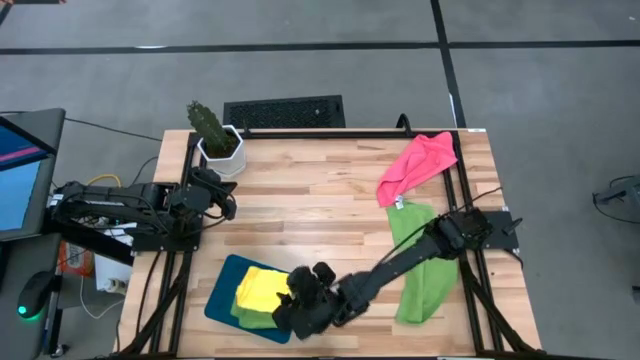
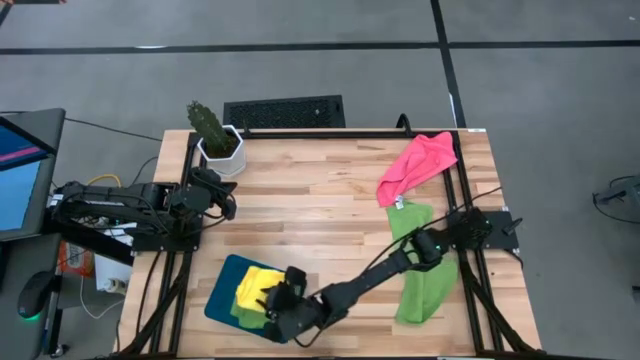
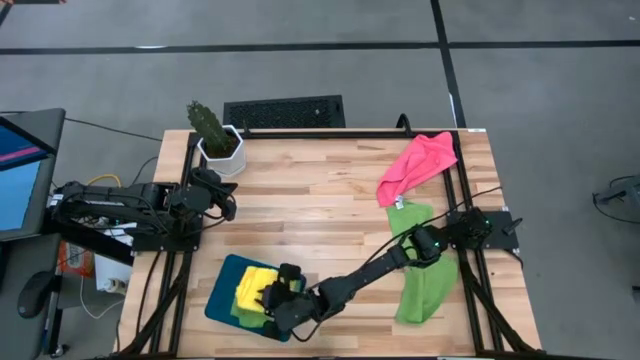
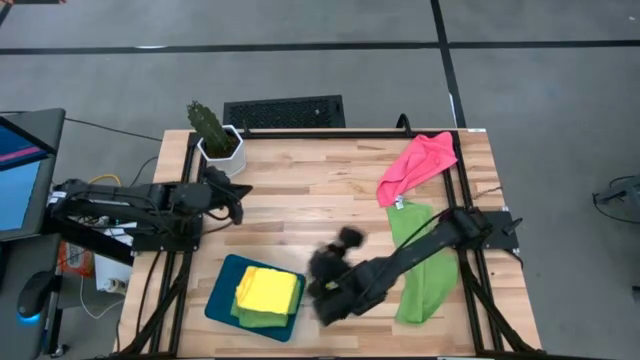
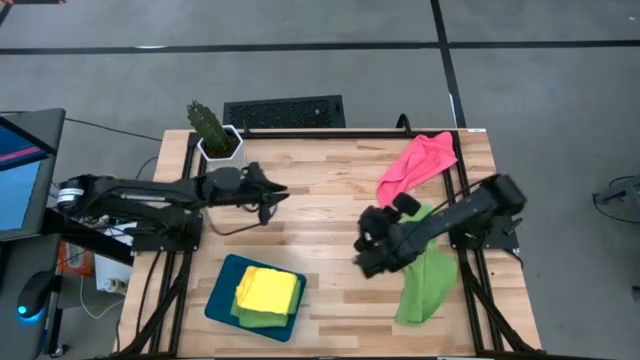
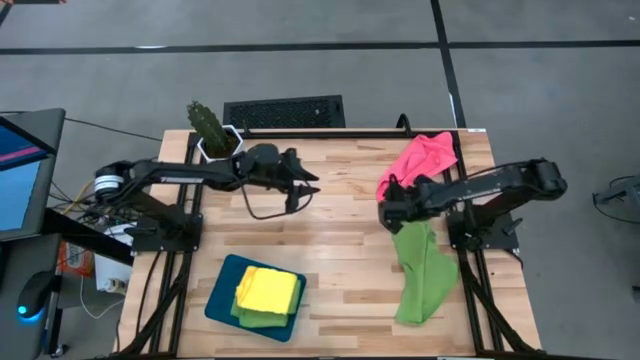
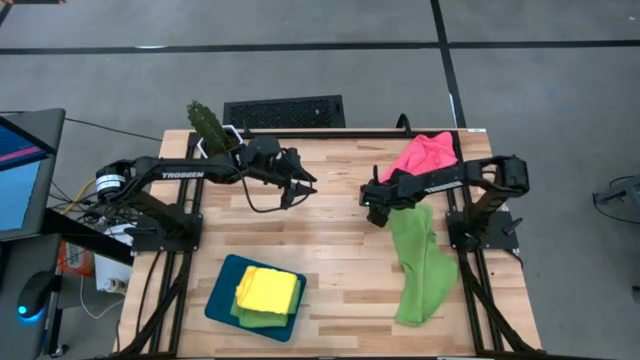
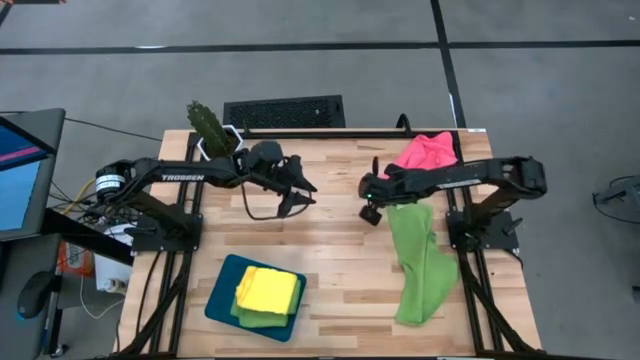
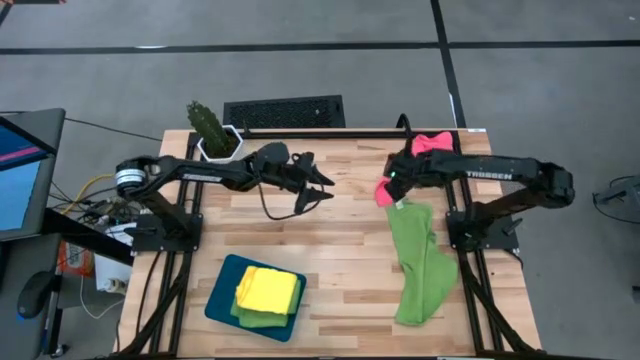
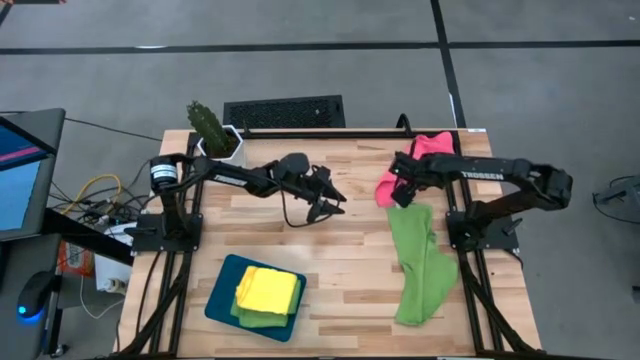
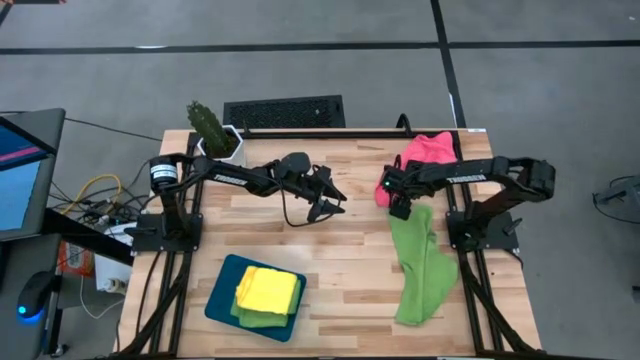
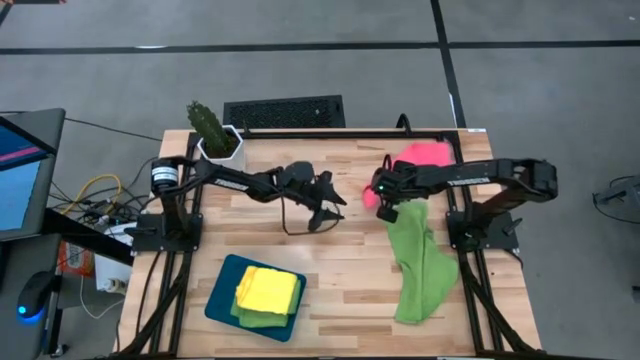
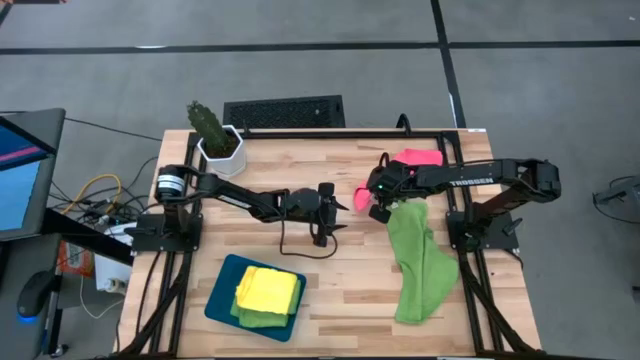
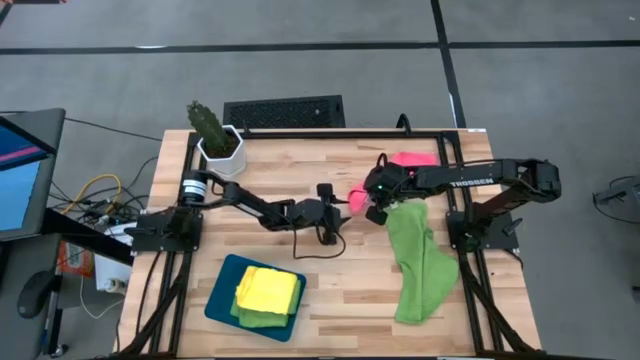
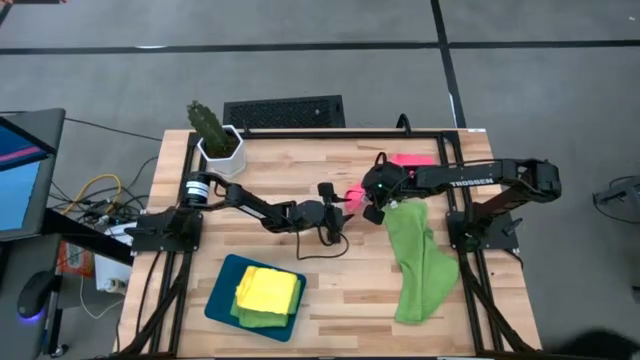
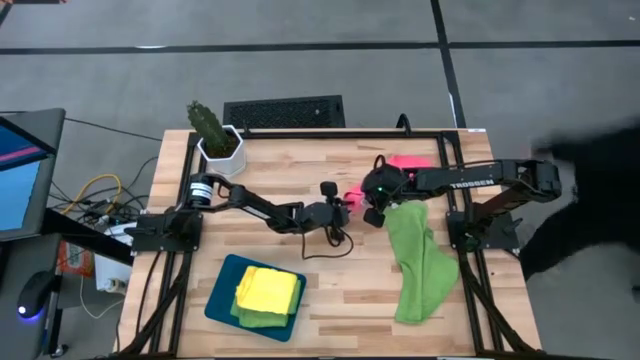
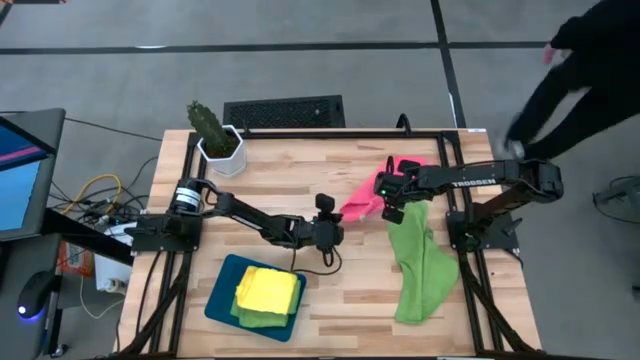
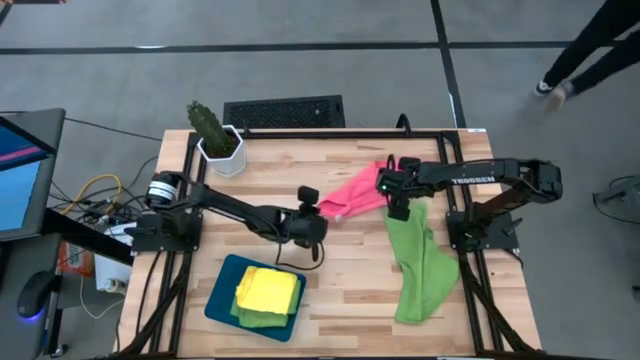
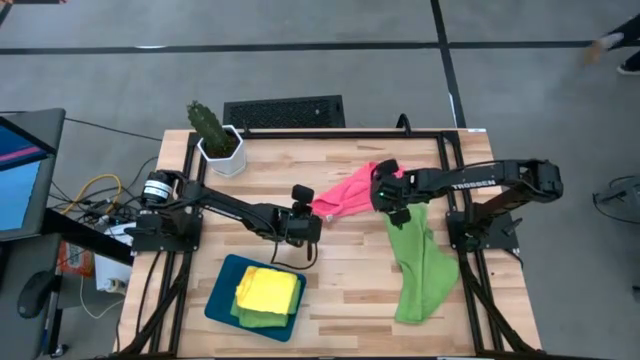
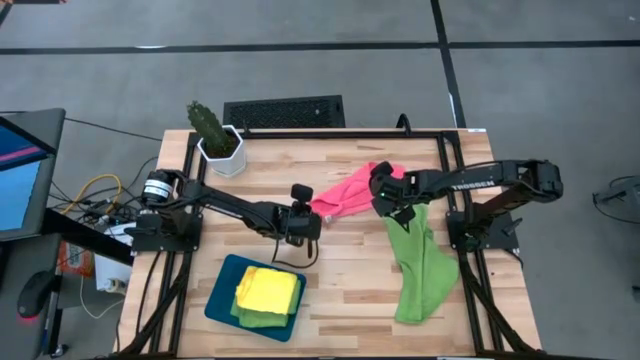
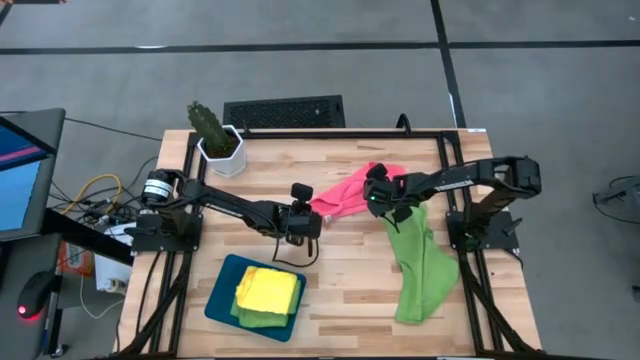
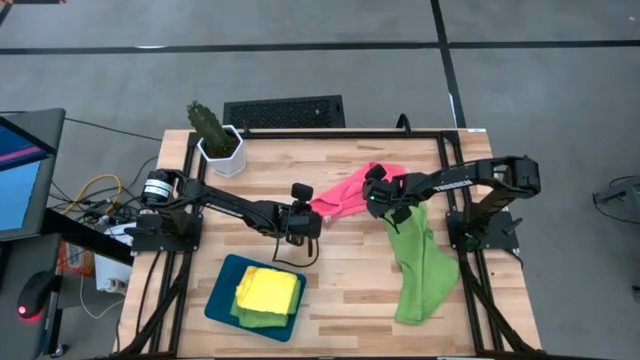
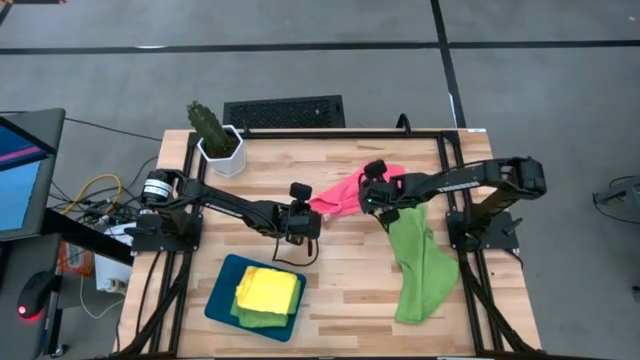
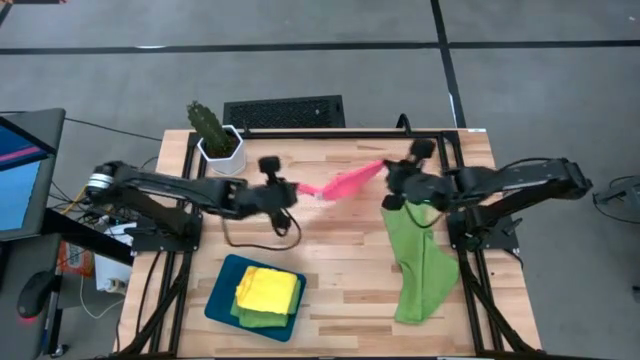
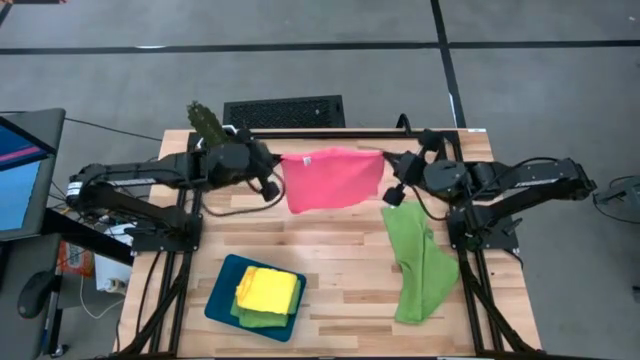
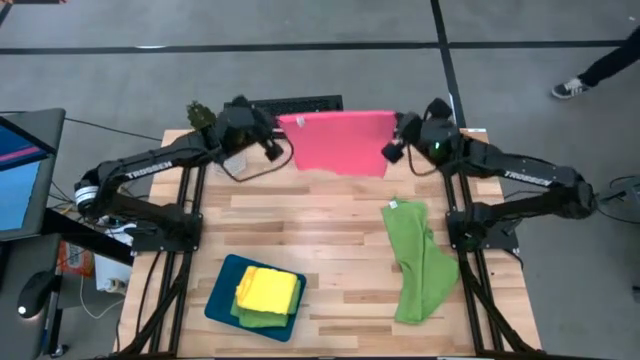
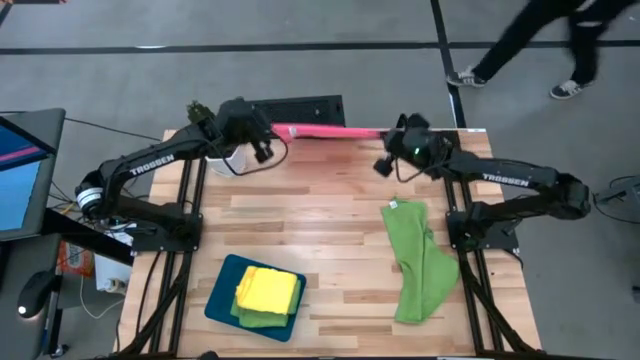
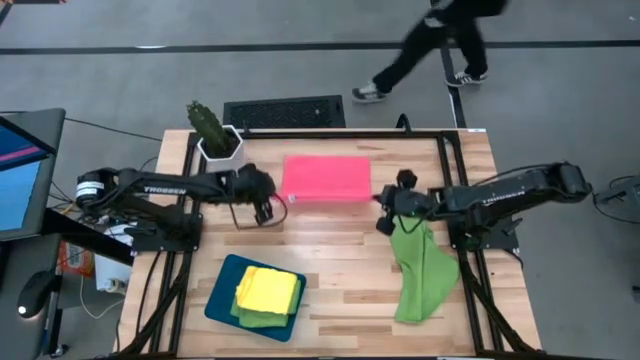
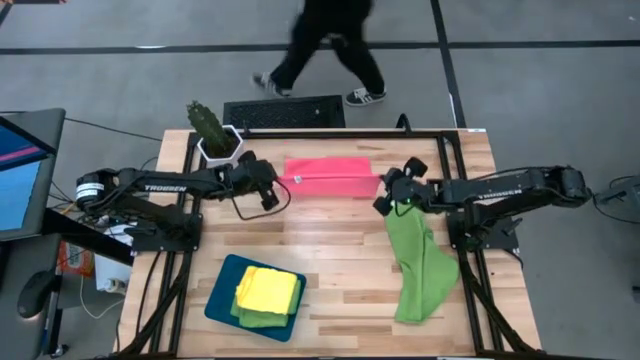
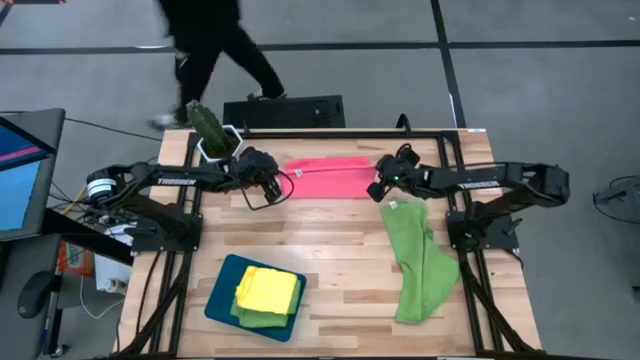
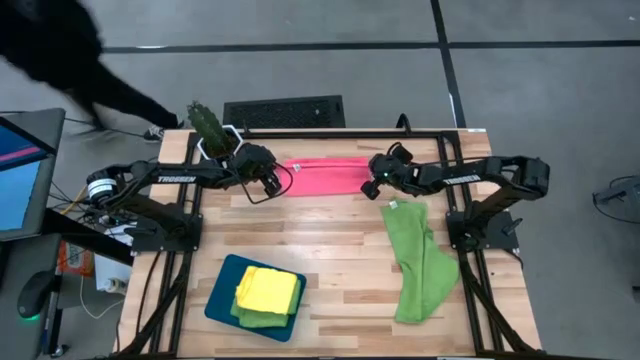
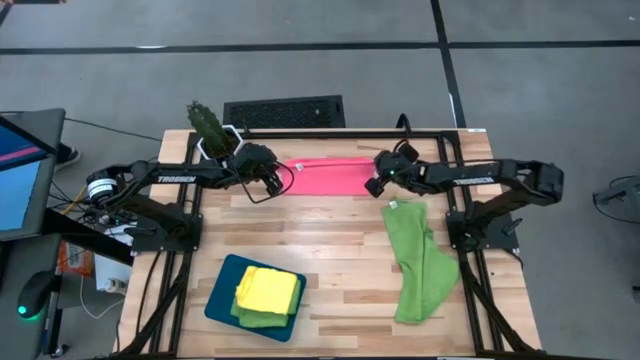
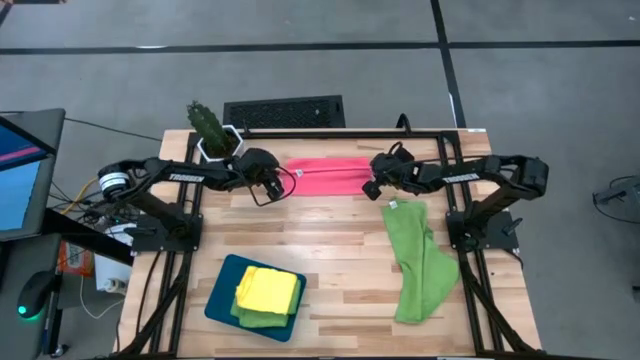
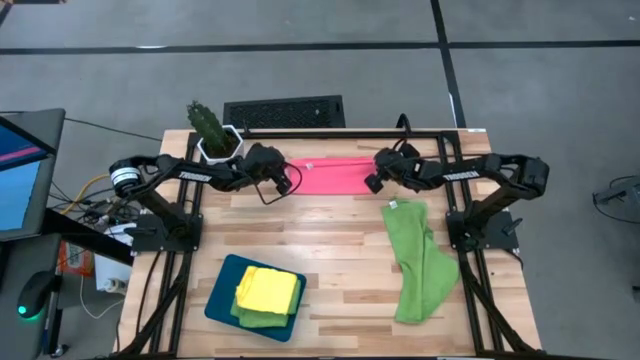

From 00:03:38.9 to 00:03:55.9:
Task: Fold microfiber towels
Fold the pink microfiber

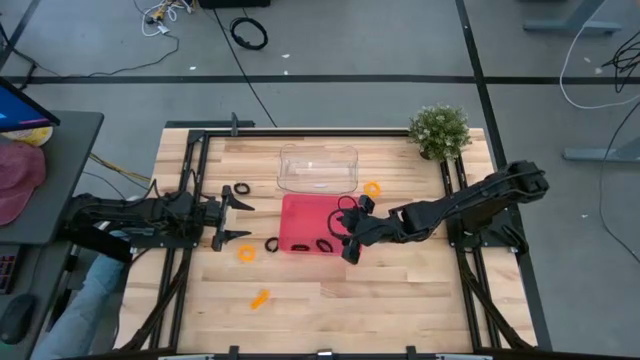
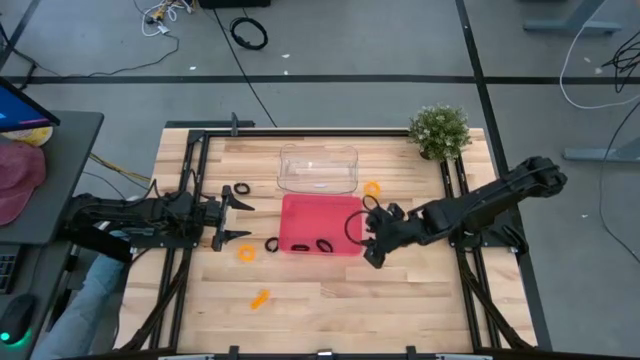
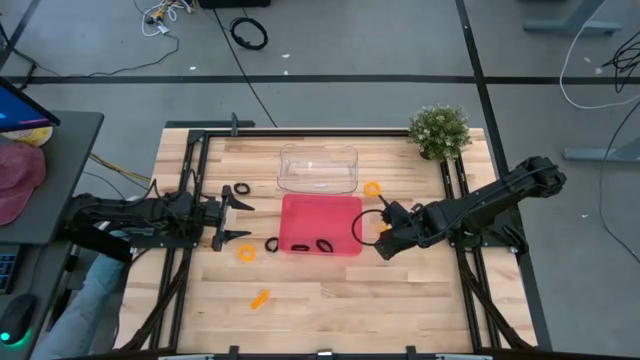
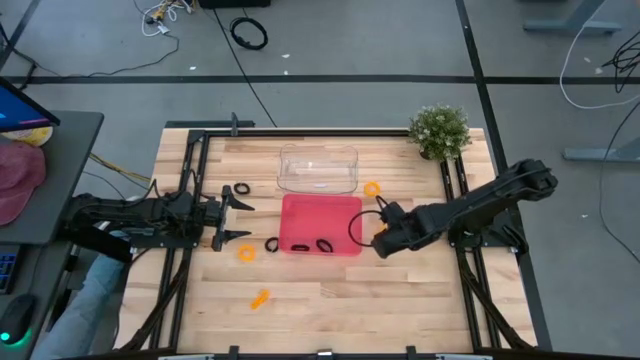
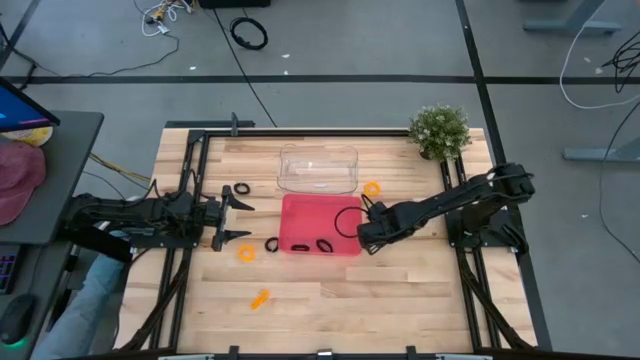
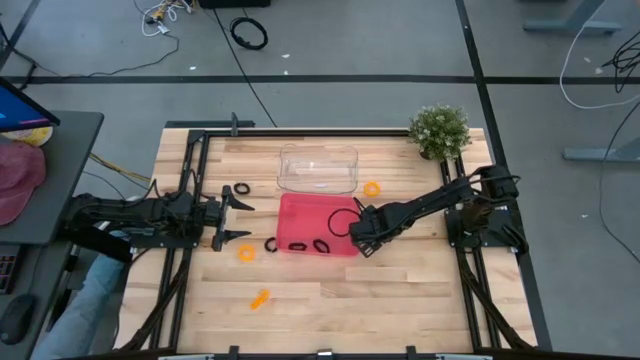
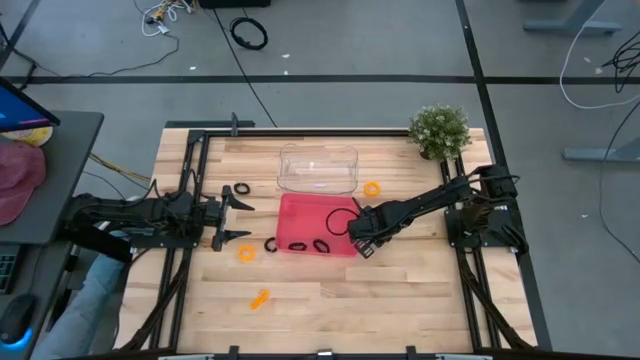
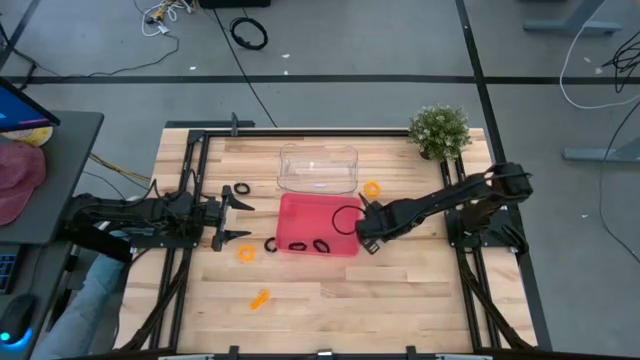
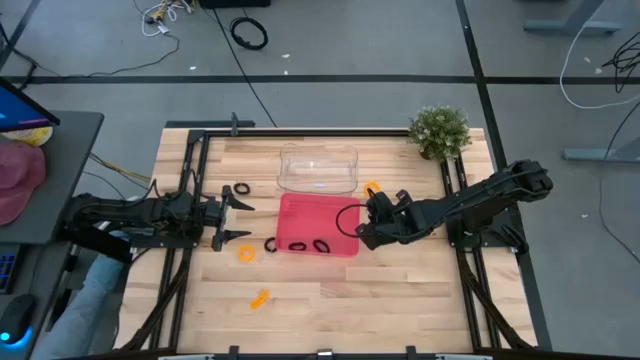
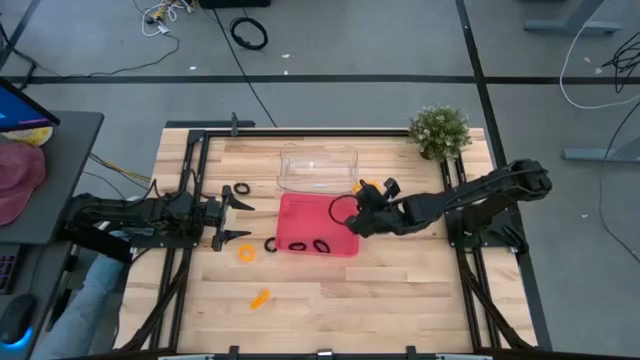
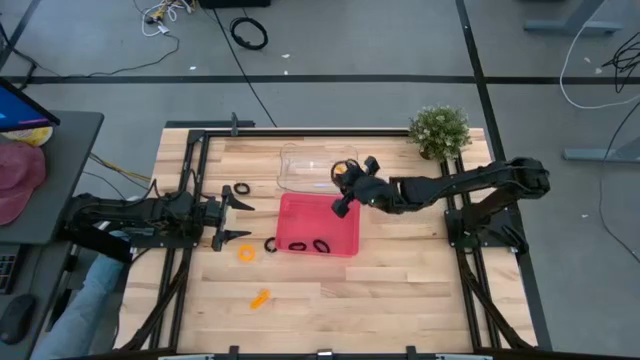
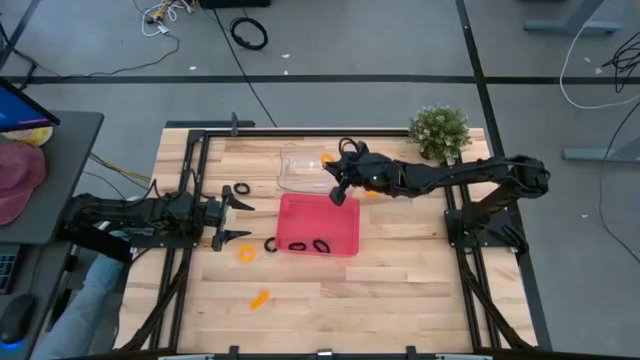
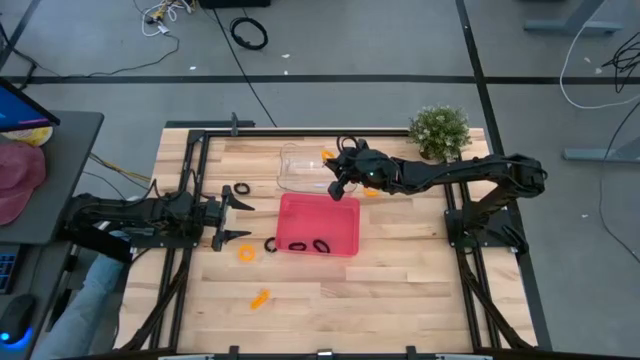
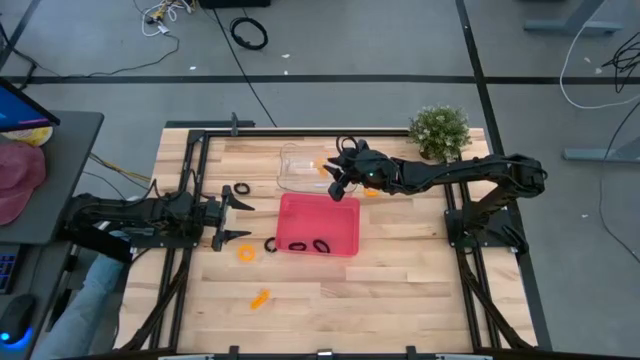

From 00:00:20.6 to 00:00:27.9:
Task: Sort spring keychains
Put the orange spring keychain into the transparent bin
